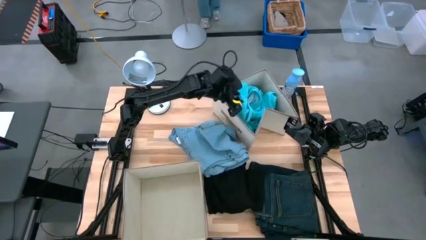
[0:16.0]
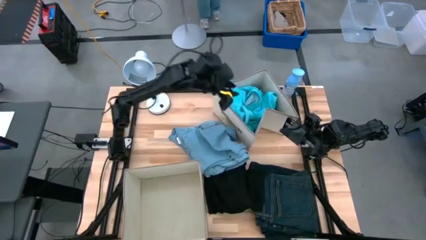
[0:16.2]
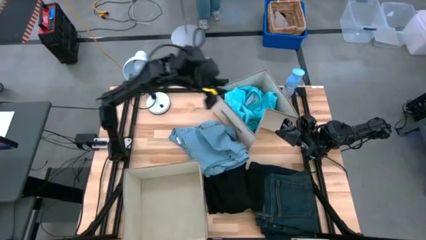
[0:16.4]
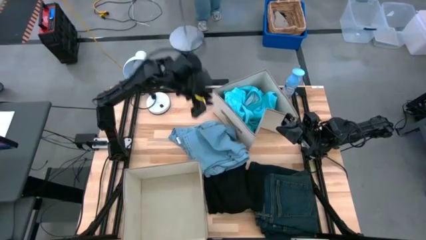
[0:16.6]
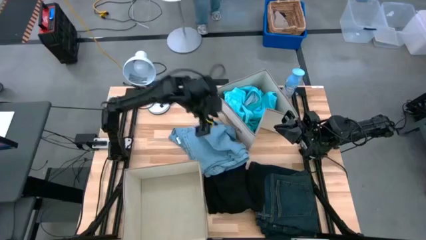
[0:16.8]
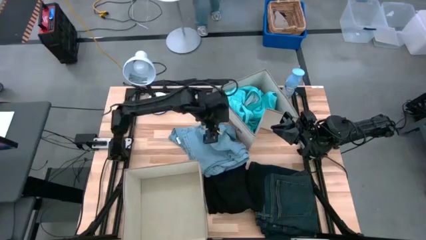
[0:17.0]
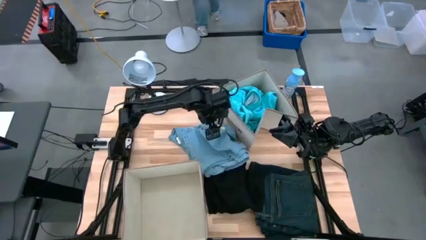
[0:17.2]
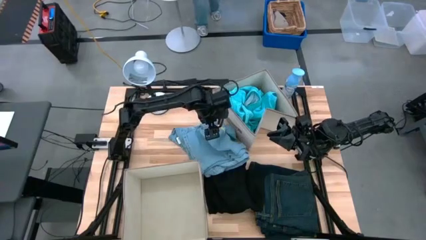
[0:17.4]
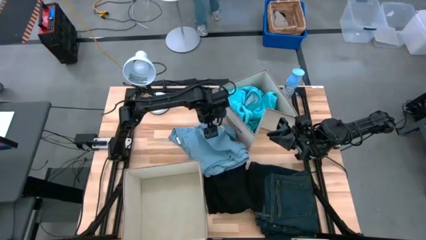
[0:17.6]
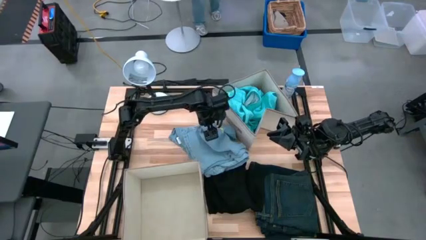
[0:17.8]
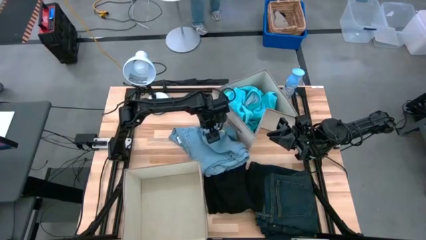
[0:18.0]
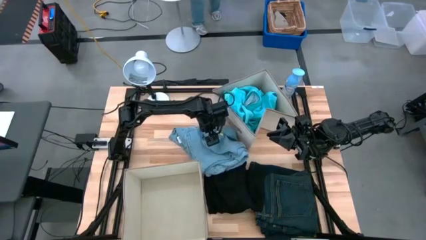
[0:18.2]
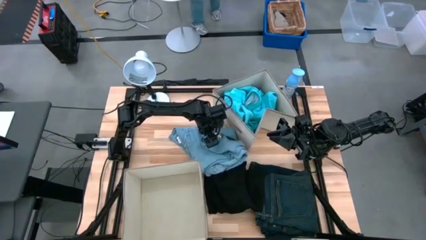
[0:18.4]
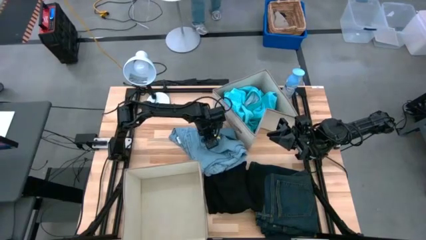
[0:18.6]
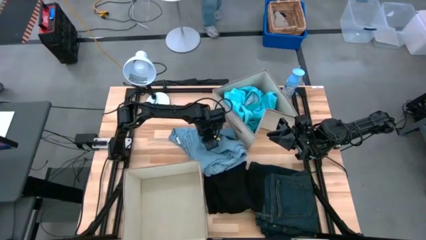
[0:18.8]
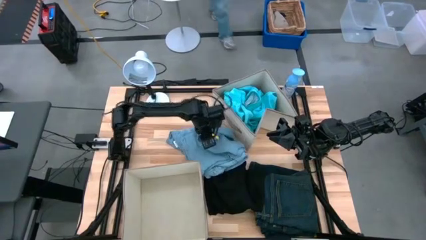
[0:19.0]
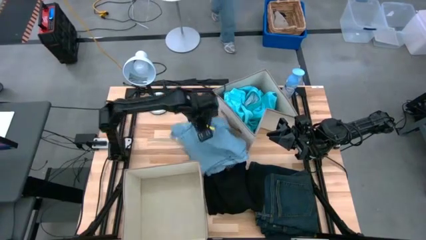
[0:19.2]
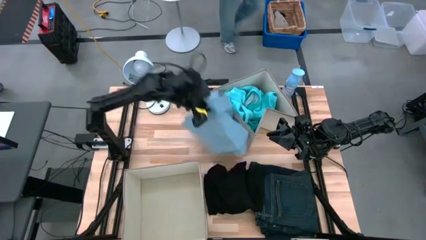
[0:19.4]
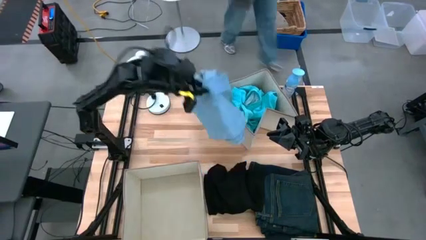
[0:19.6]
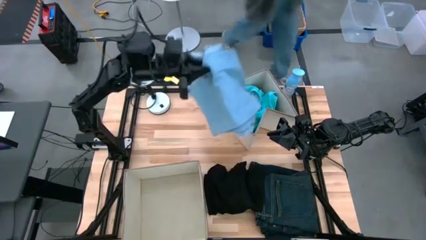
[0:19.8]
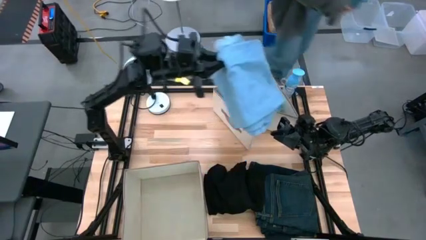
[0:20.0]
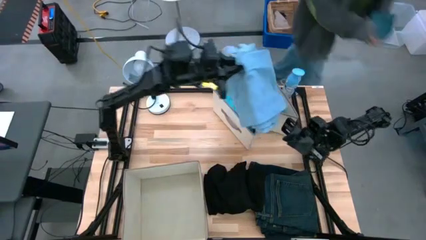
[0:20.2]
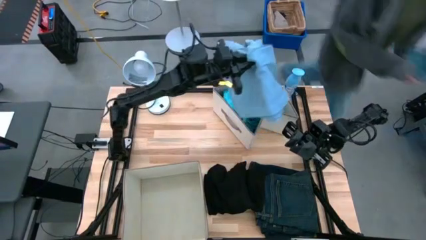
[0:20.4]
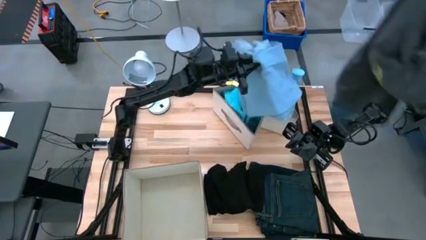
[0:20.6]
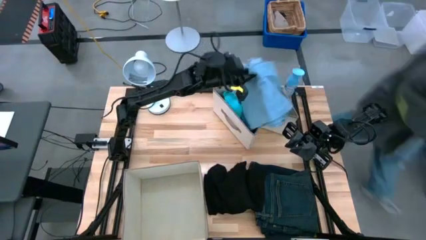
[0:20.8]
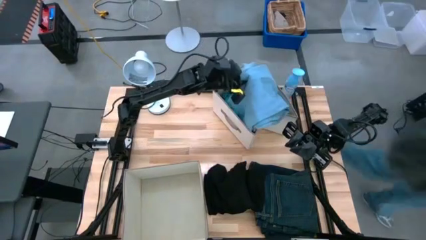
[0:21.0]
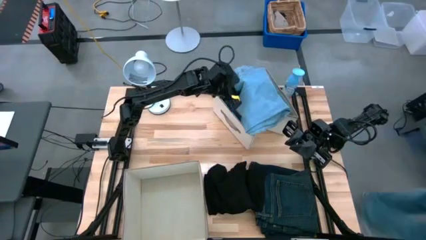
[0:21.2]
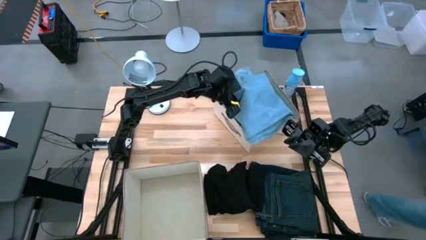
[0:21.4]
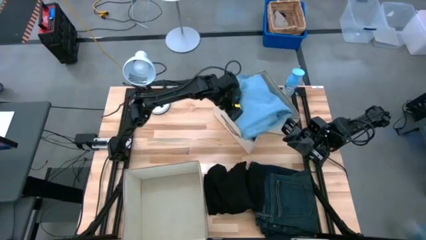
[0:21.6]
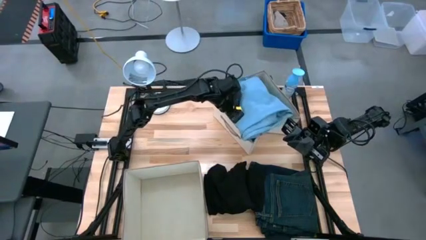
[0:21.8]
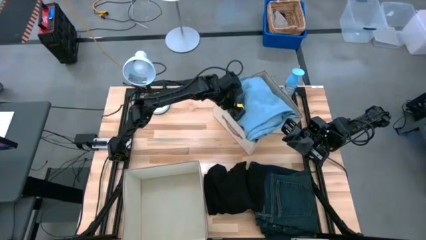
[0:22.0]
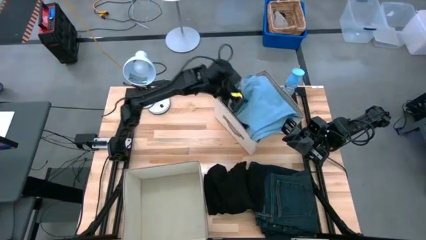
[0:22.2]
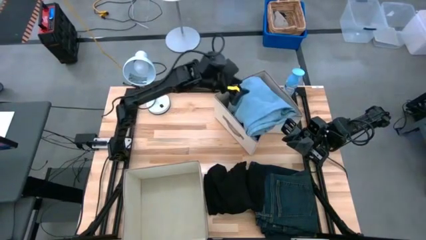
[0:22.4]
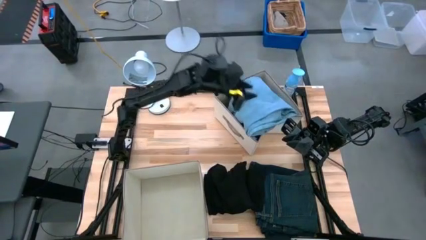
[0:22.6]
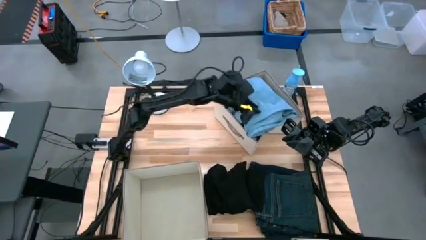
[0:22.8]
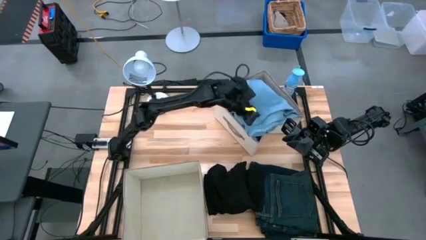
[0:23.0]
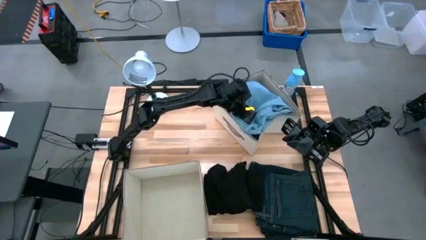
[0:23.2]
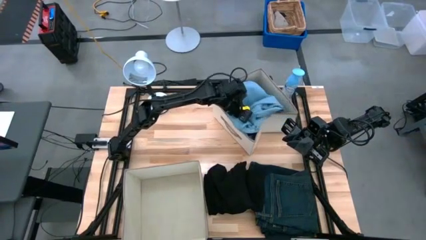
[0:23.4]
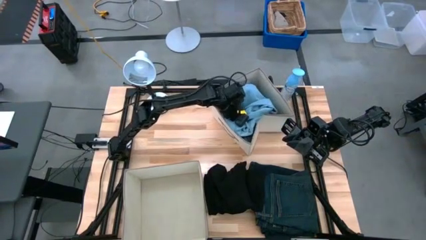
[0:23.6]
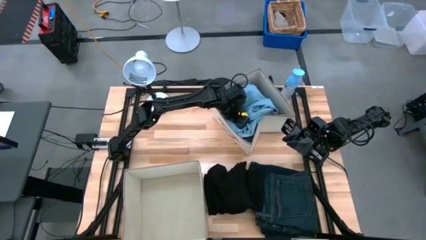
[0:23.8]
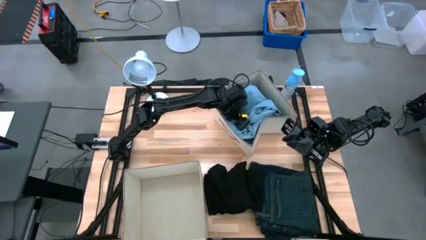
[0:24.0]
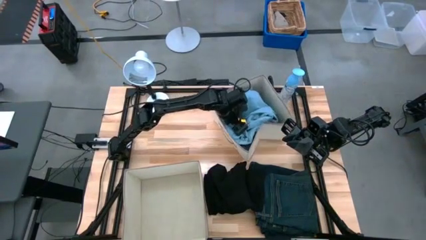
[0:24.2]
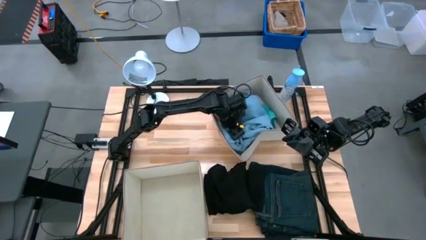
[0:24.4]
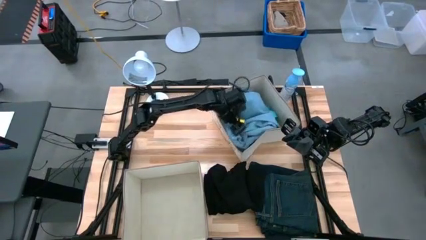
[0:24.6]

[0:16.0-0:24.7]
Task: Sort clothes
Put the light blue pants into the top laundry organizer

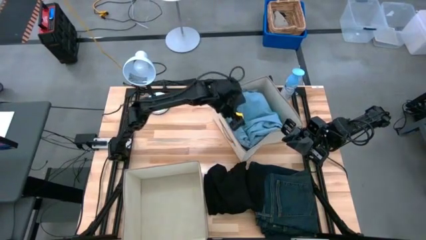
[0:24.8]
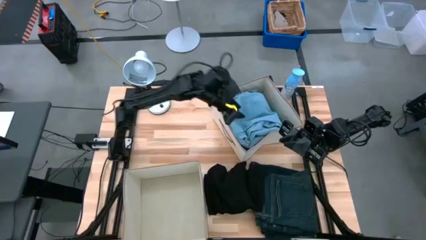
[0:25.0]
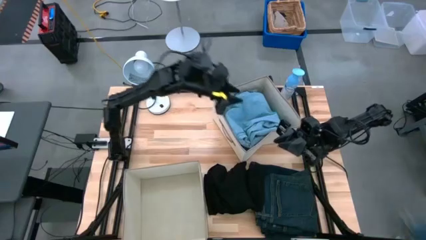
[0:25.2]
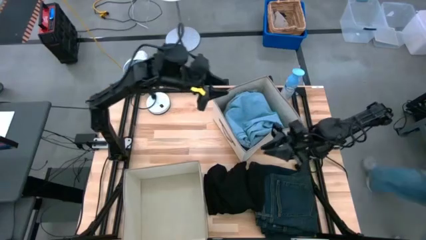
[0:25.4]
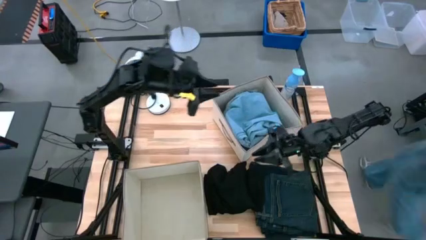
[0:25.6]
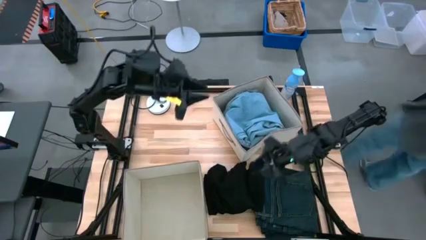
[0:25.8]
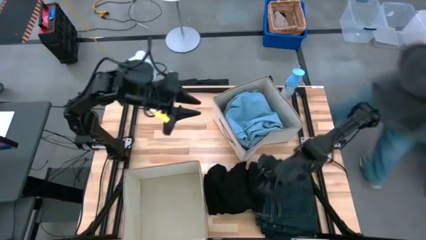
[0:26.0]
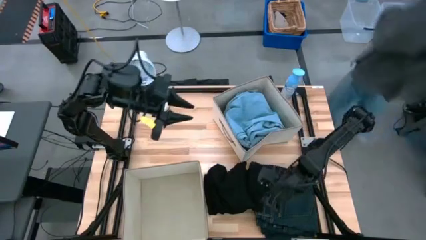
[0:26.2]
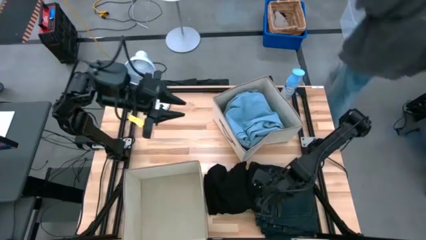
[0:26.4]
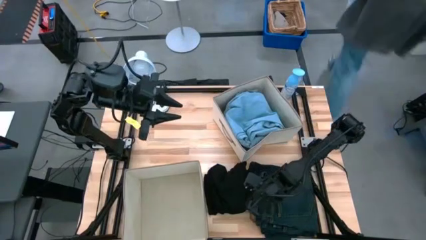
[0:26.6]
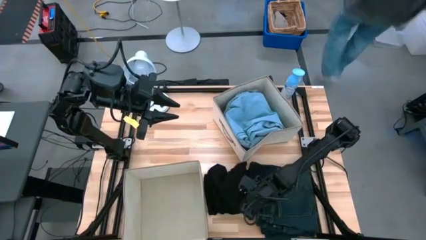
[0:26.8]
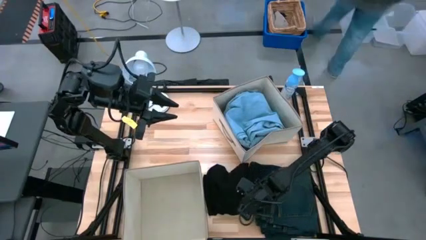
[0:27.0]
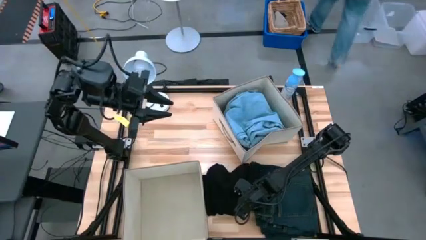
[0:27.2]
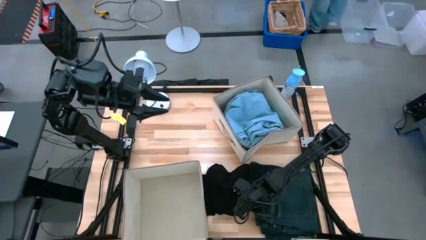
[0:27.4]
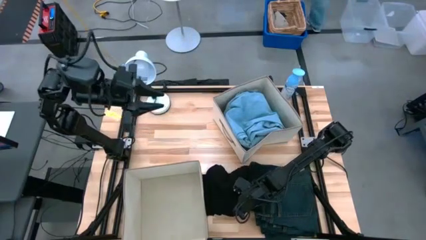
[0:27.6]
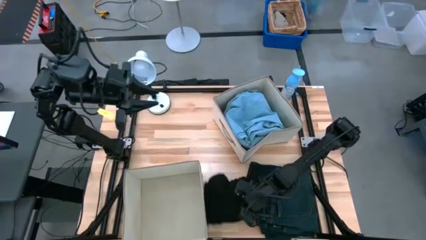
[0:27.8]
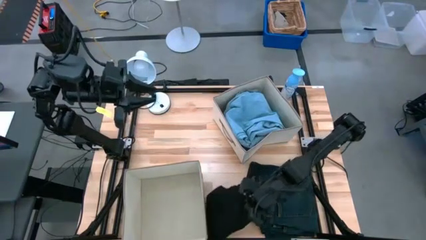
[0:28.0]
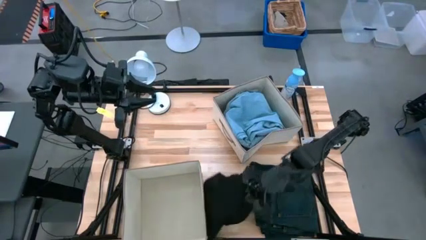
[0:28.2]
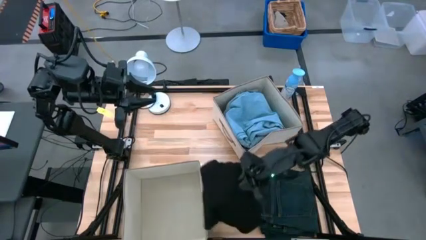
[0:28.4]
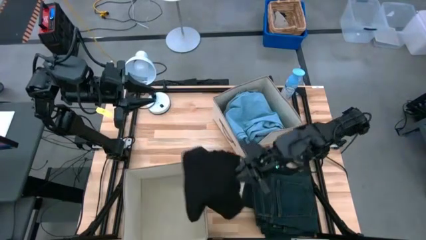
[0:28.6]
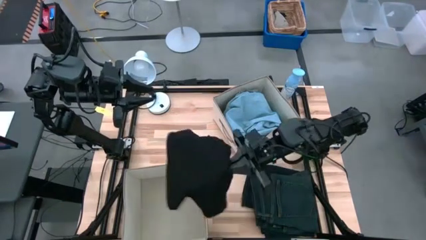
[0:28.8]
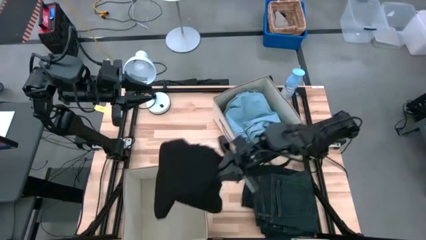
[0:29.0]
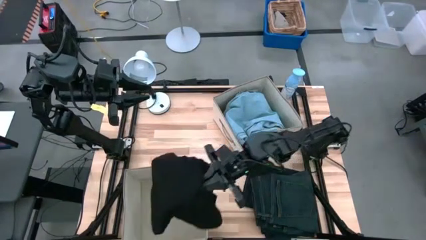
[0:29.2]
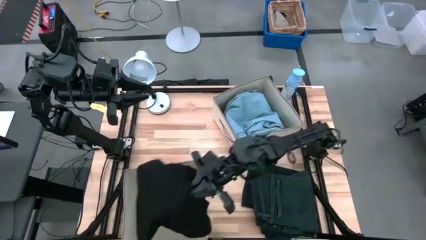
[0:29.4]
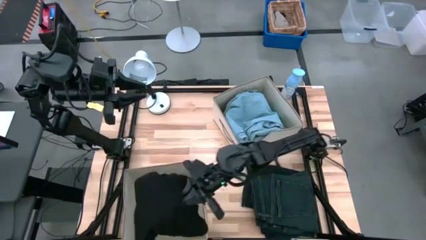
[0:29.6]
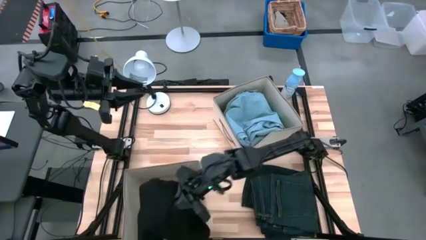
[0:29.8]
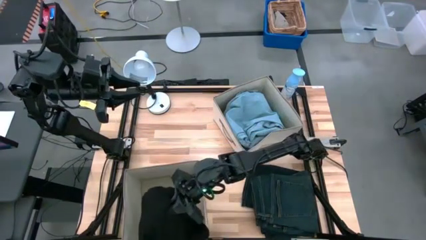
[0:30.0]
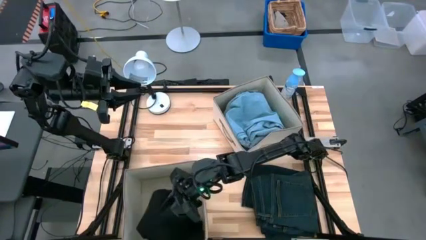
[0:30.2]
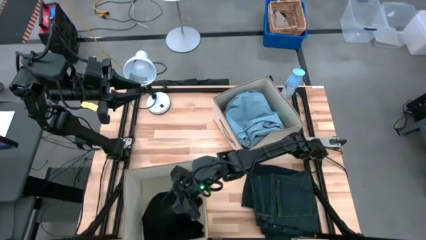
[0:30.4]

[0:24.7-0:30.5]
Put the black jacket into the bottom laundry organizer
